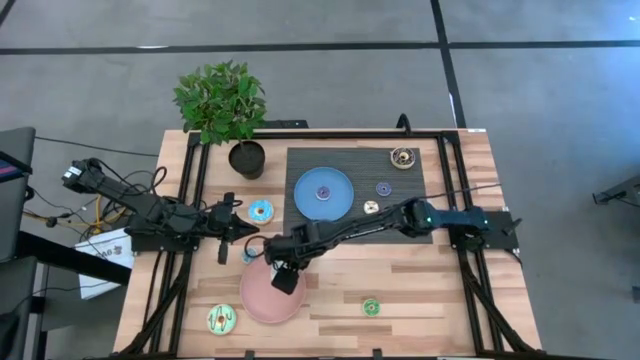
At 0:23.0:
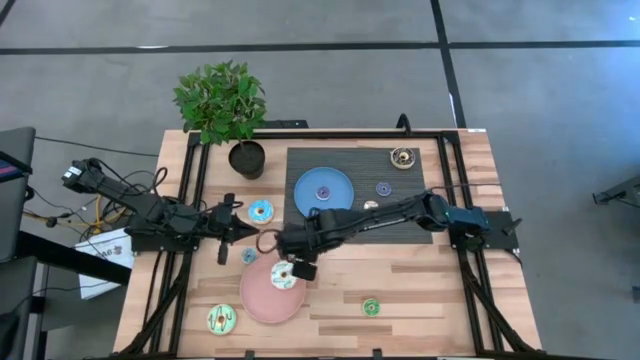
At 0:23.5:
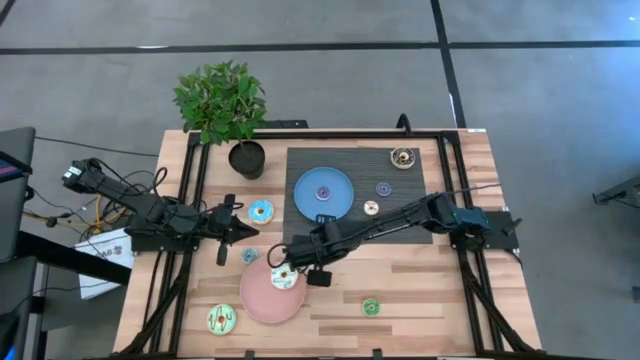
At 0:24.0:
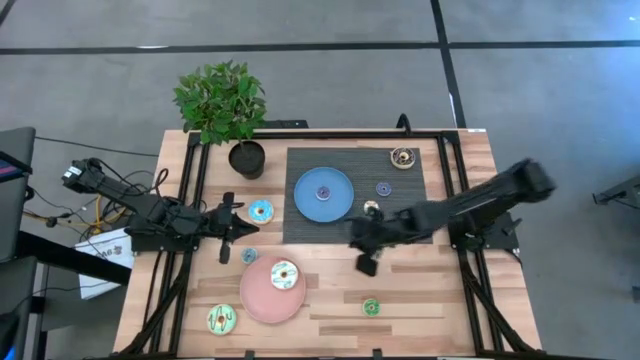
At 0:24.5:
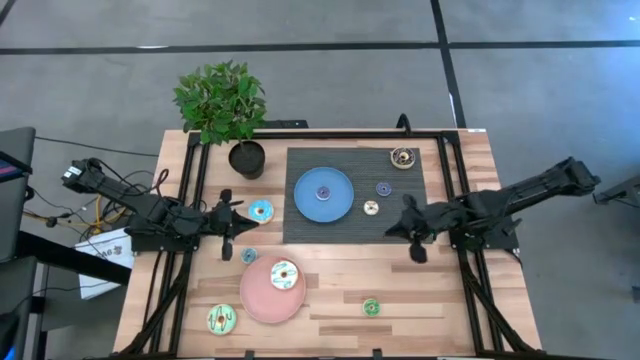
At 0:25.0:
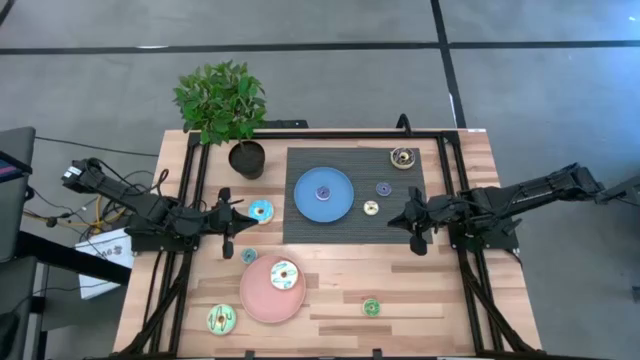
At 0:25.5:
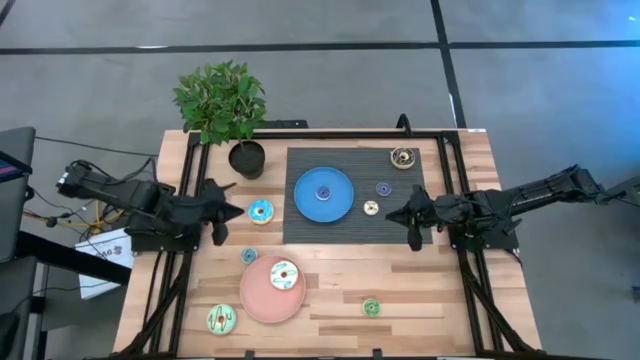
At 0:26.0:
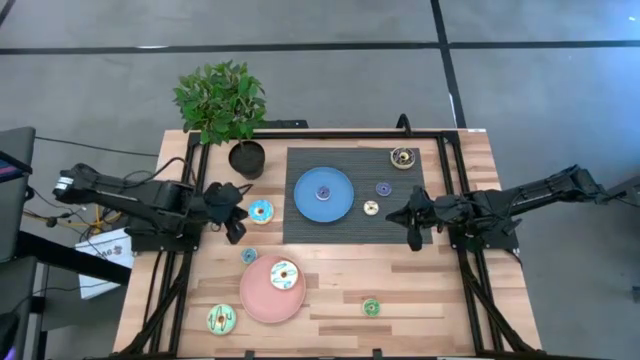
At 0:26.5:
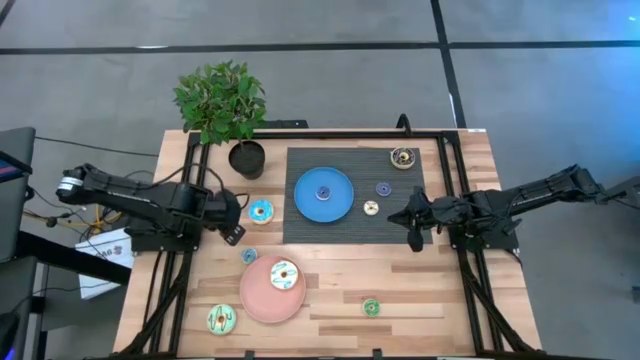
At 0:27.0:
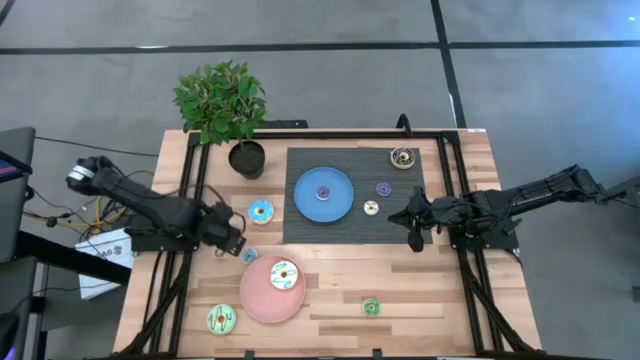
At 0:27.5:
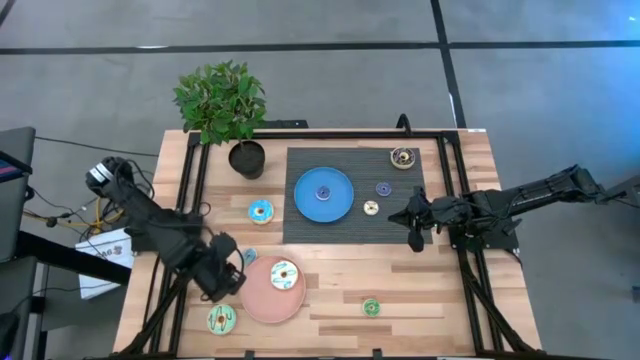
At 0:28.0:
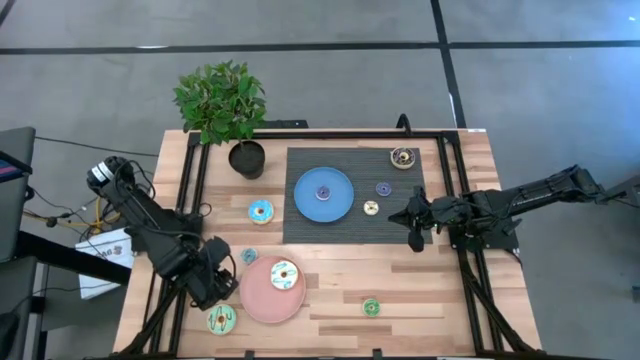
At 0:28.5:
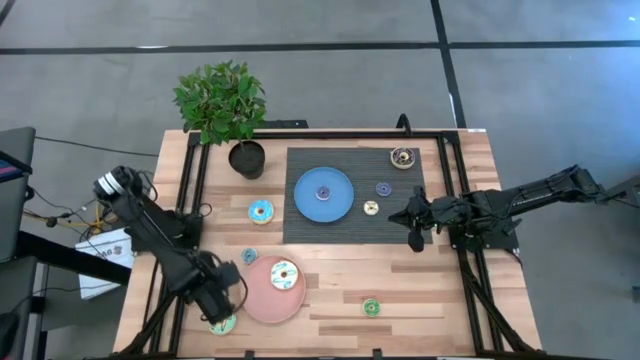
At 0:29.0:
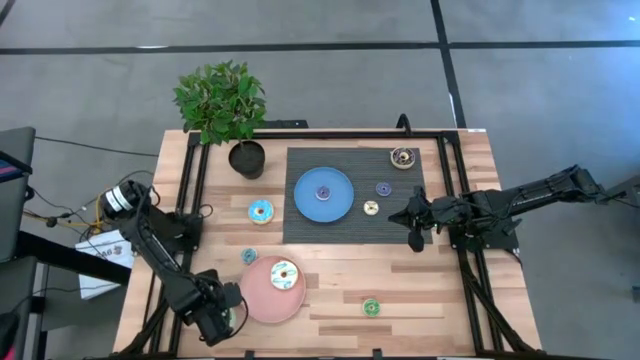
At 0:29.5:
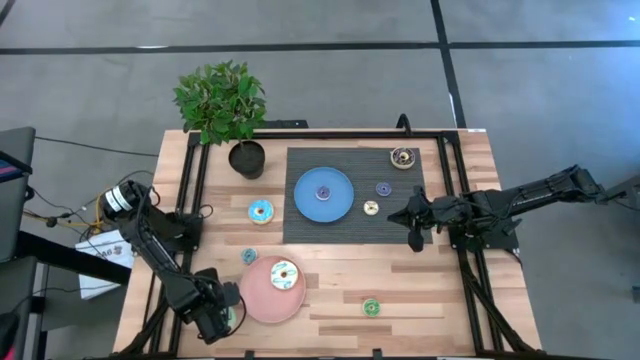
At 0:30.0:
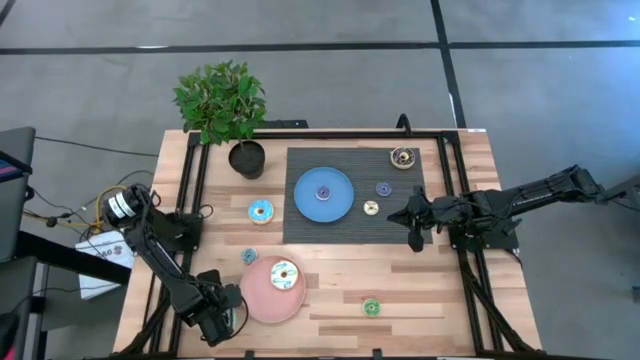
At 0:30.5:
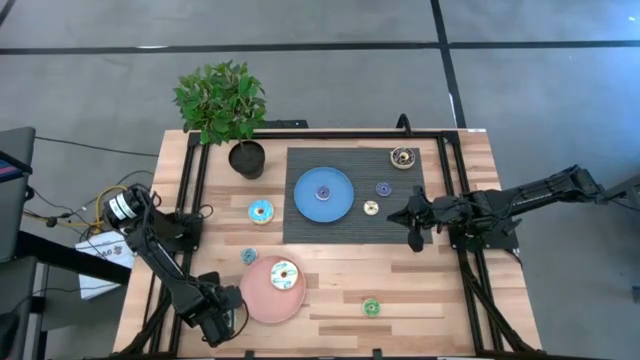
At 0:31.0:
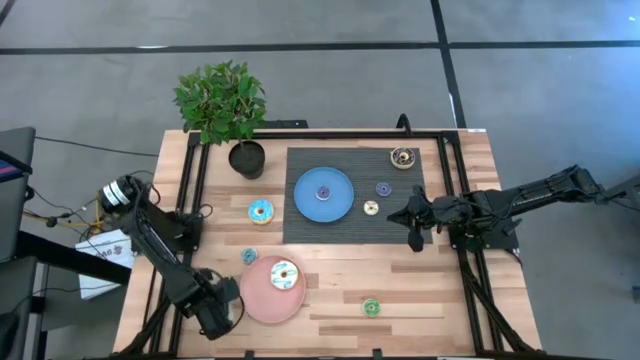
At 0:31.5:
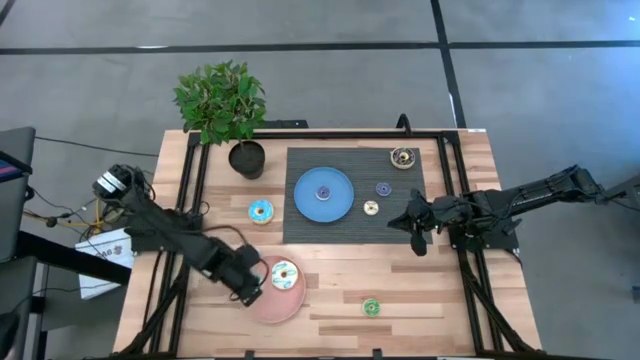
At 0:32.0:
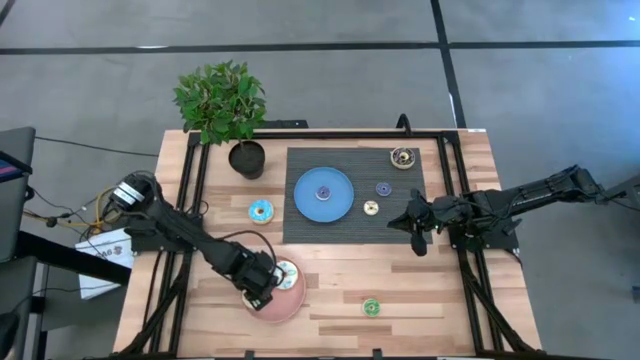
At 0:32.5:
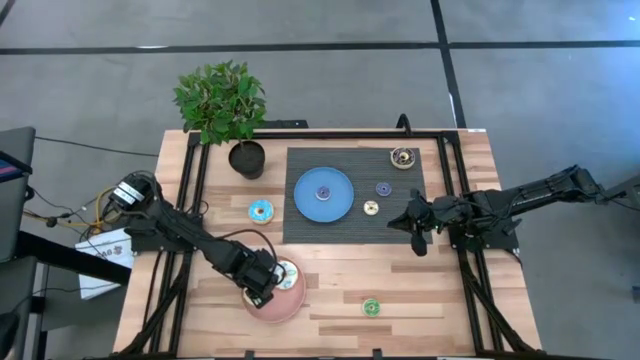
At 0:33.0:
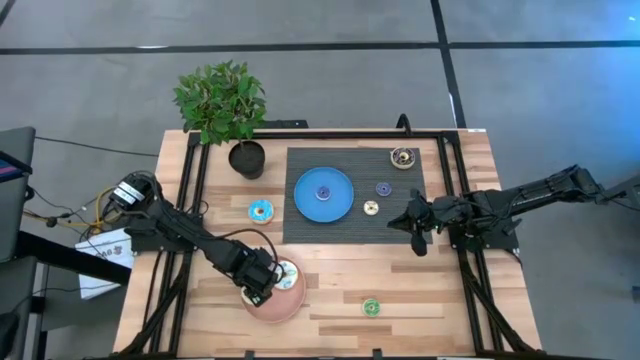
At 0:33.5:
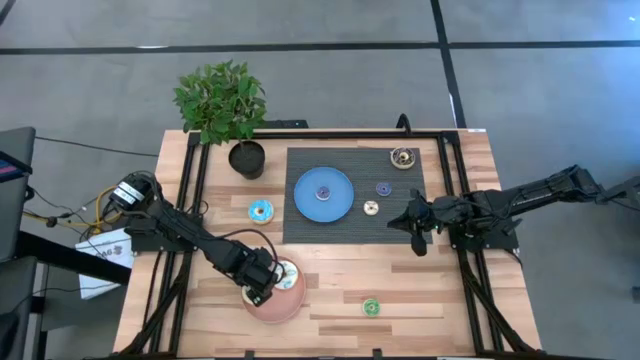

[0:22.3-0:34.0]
Task: Pick & Place donuts
Put the large light blue donut on the light orange plate

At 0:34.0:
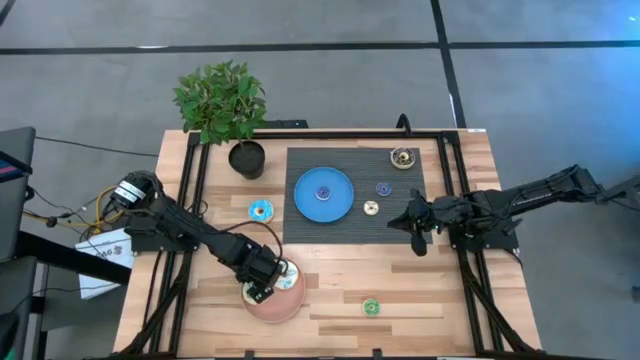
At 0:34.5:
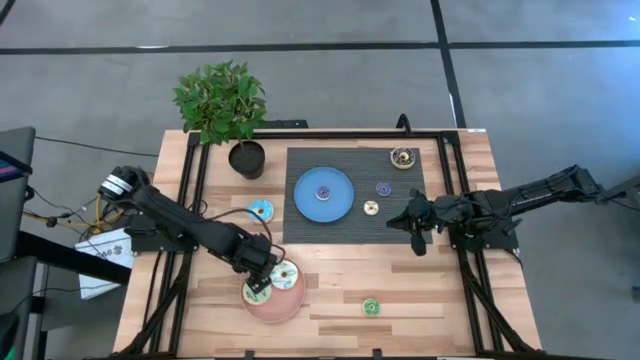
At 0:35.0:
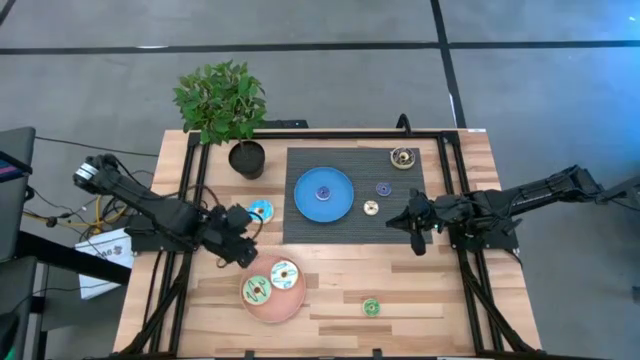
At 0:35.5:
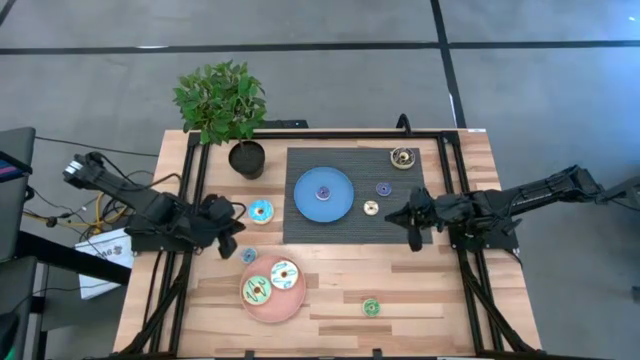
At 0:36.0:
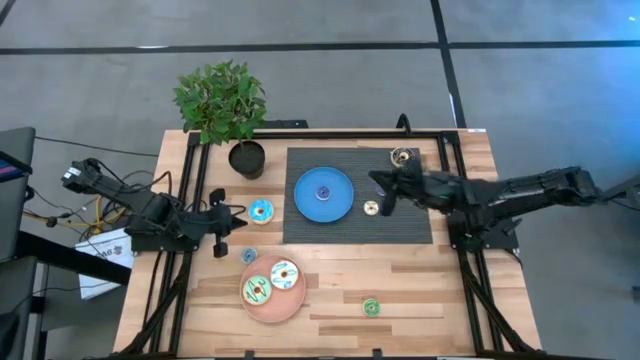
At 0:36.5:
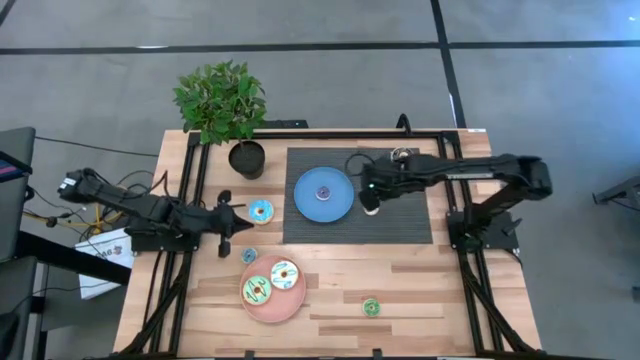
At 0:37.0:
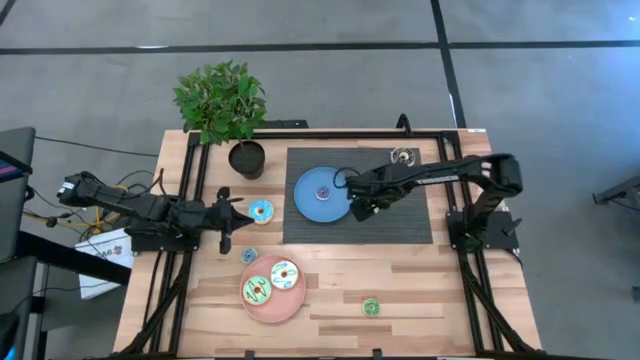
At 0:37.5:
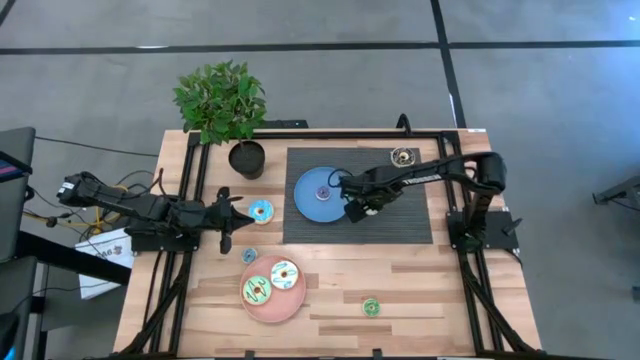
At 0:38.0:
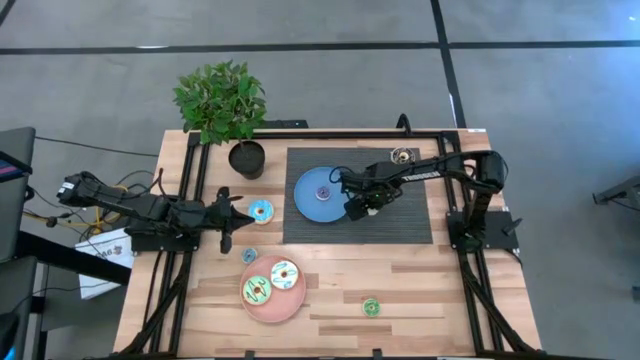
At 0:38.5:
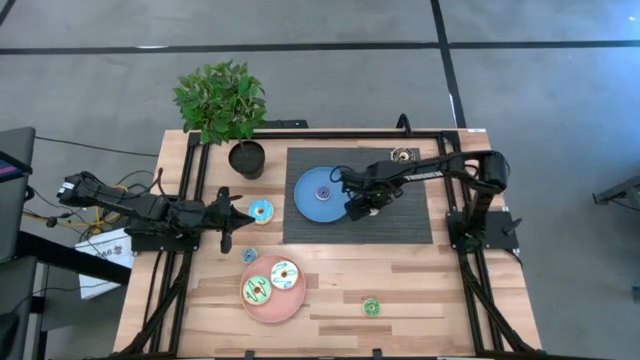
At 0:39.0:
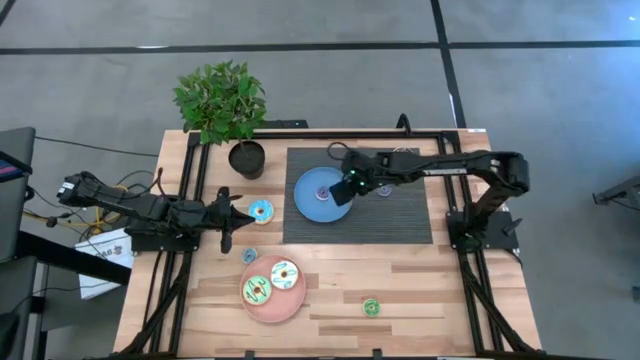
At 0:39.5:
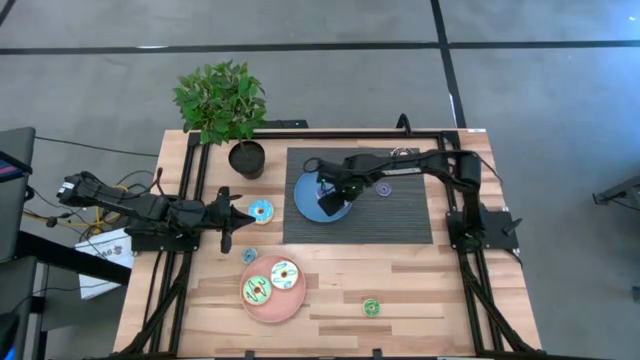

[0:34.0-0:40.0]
Put the small white donut on the blue plate

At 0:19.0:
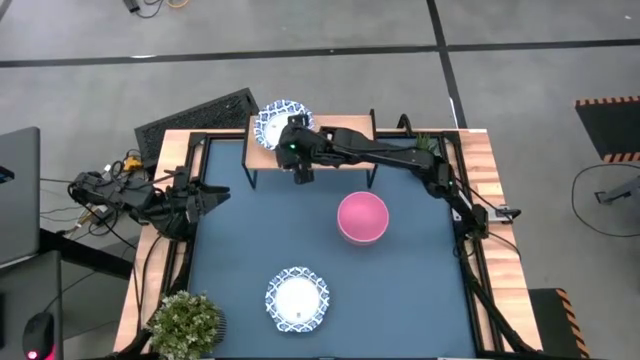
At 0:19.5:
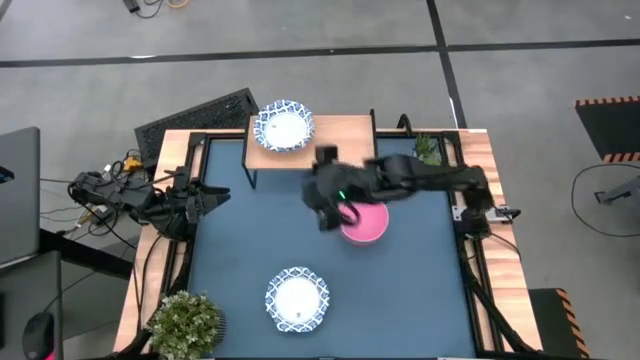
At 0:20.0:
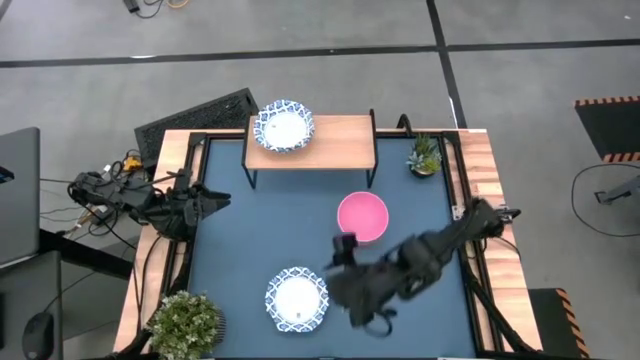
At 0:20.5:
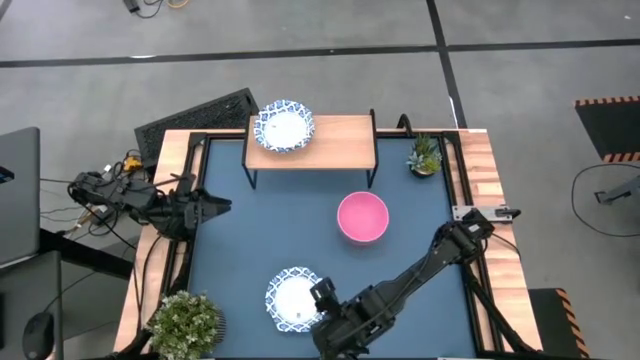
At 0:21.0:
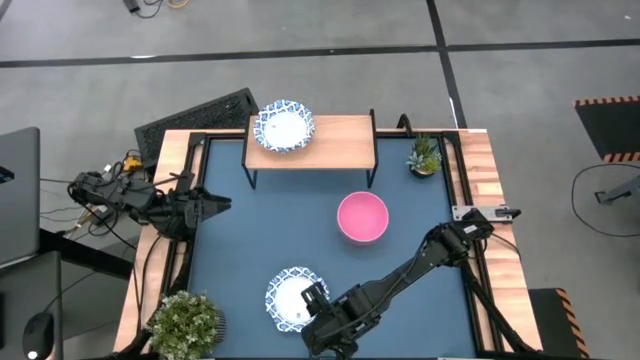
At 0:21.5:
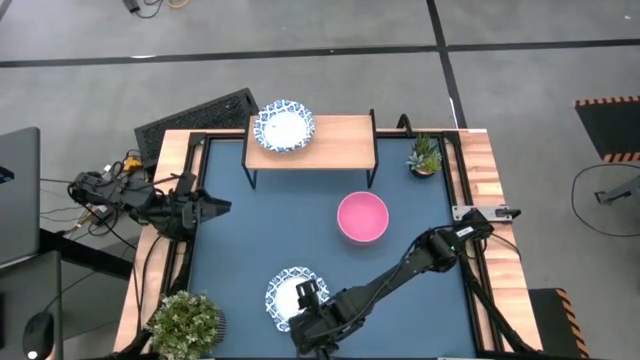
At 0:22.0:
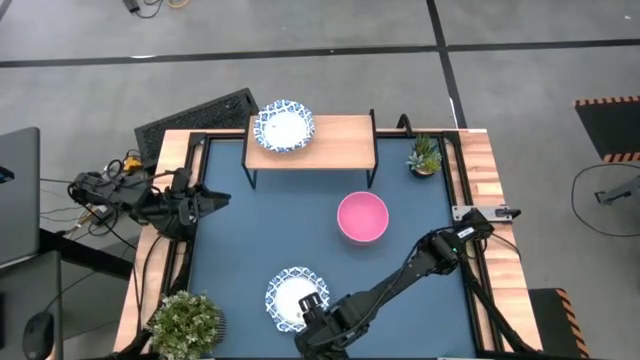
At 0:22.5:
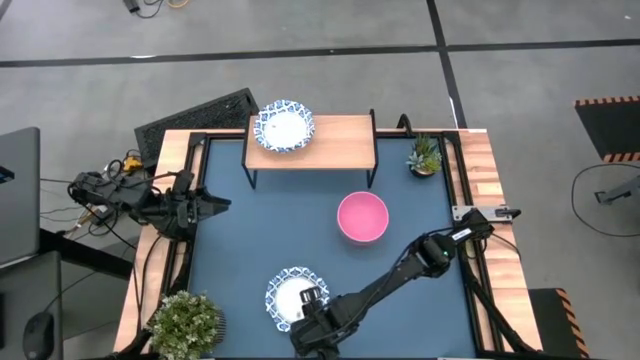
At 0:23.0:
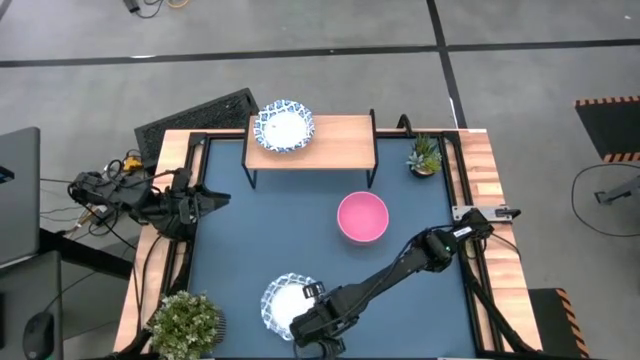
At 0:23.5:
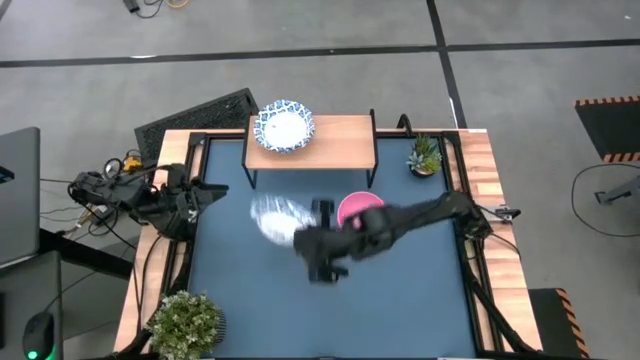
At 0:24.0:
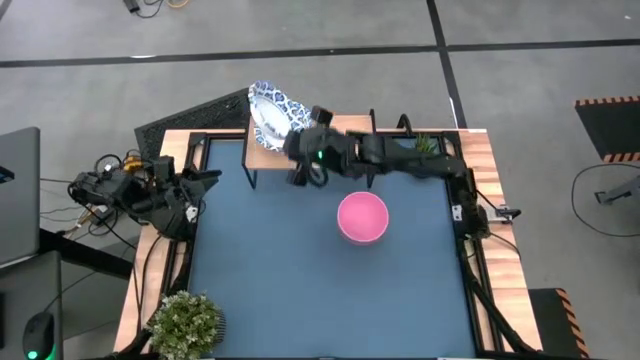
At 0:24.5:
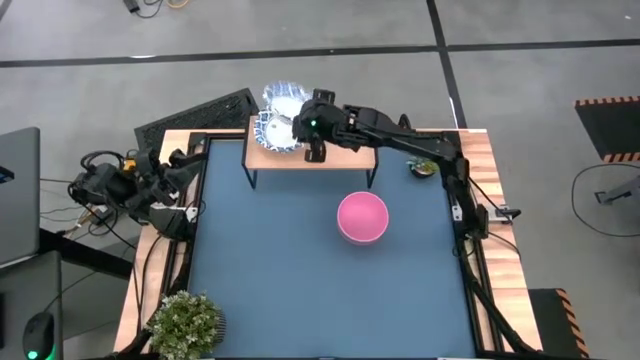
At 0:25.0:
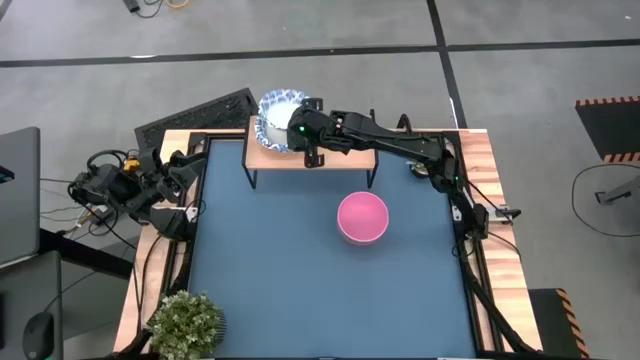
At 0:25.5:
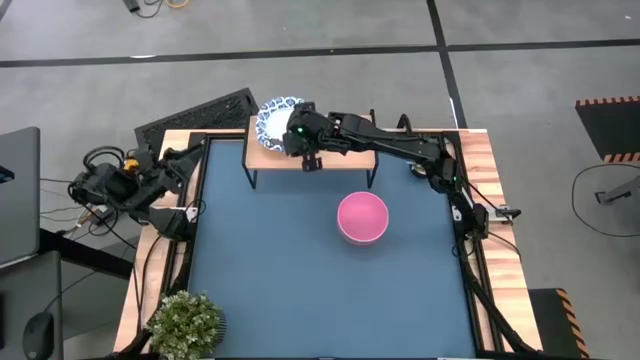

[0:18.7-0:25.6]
Task: Place and stack bowls onto a shelf
Stack the white bowl on top of the white bowl on the shelf
